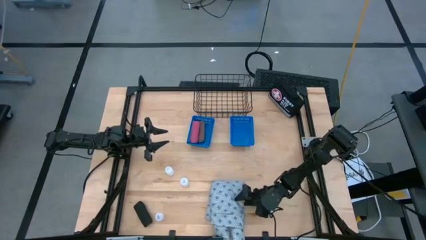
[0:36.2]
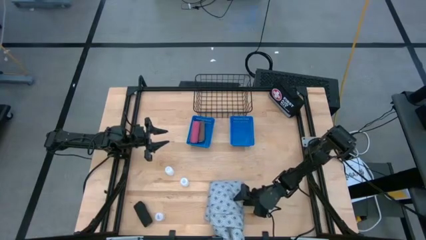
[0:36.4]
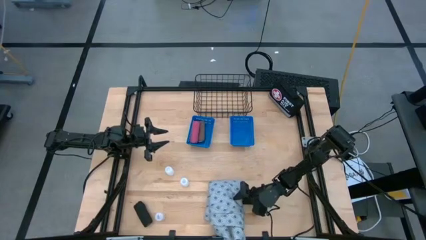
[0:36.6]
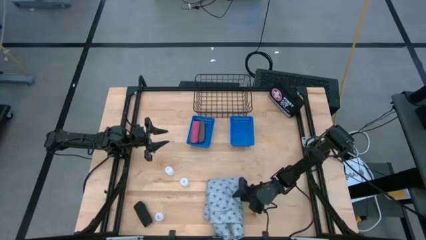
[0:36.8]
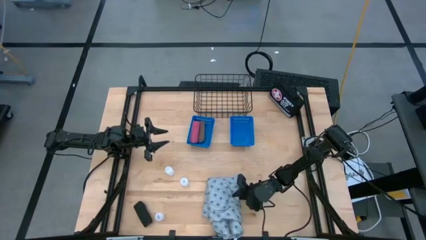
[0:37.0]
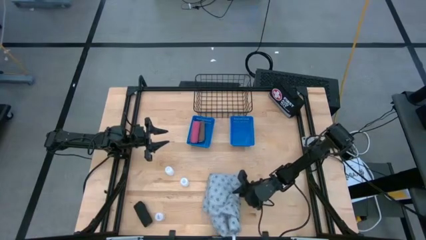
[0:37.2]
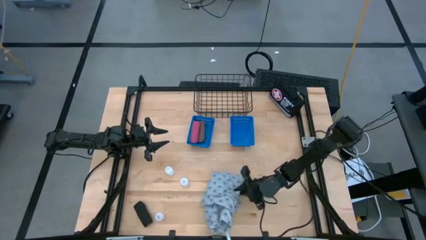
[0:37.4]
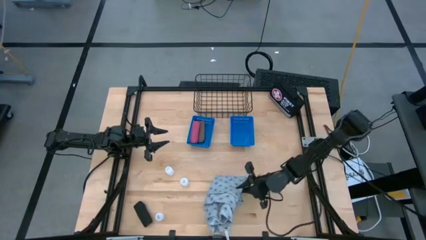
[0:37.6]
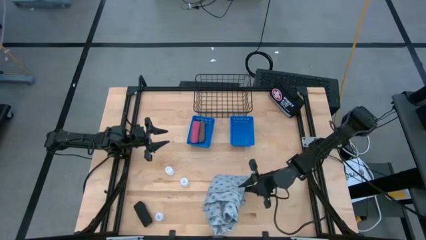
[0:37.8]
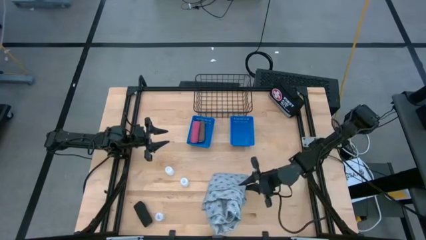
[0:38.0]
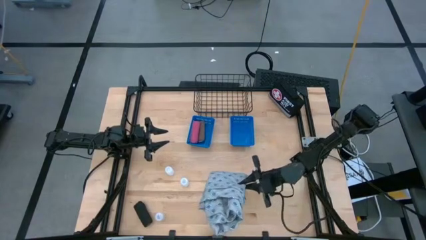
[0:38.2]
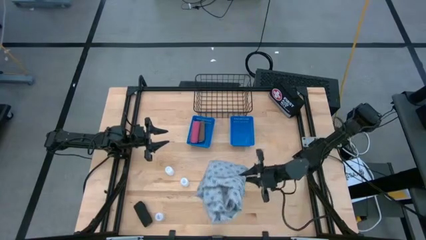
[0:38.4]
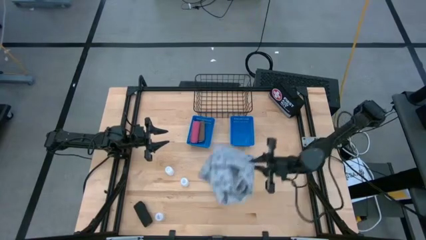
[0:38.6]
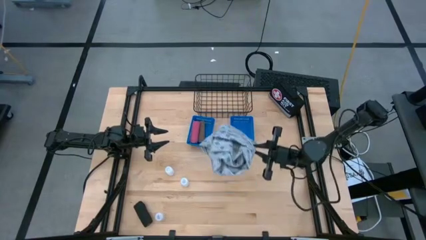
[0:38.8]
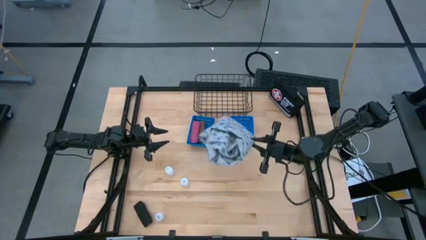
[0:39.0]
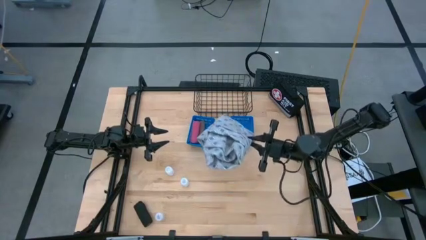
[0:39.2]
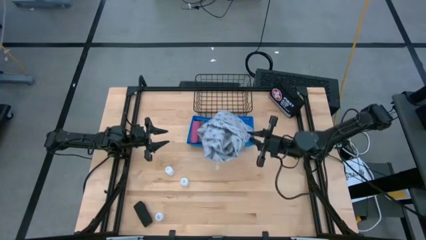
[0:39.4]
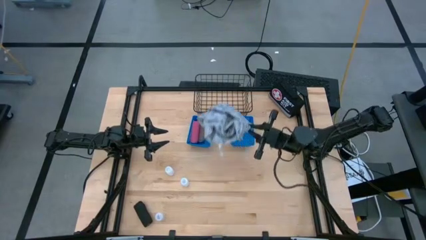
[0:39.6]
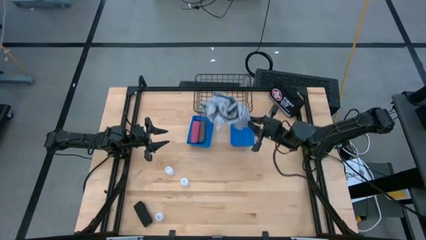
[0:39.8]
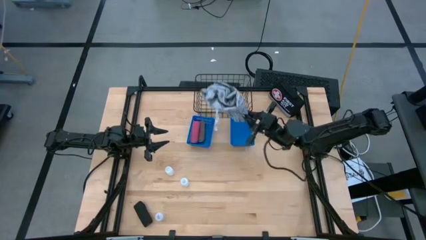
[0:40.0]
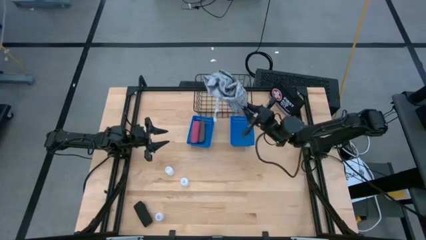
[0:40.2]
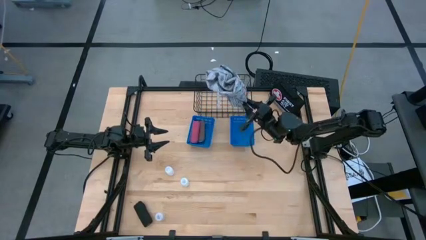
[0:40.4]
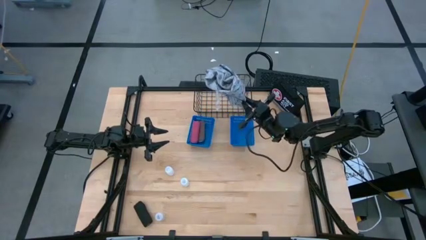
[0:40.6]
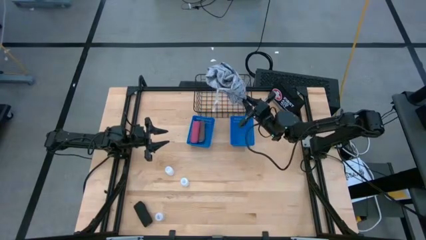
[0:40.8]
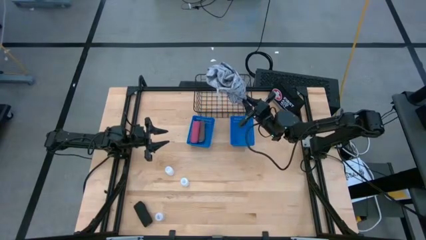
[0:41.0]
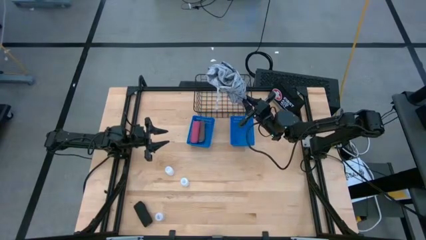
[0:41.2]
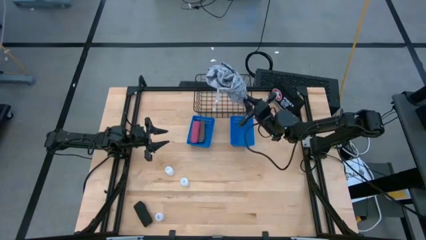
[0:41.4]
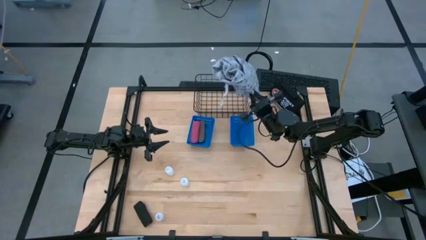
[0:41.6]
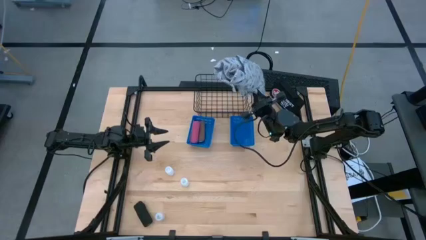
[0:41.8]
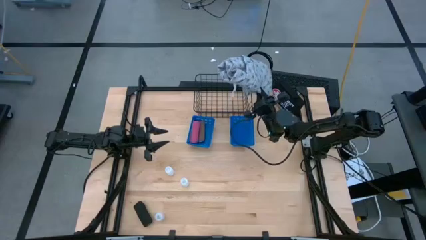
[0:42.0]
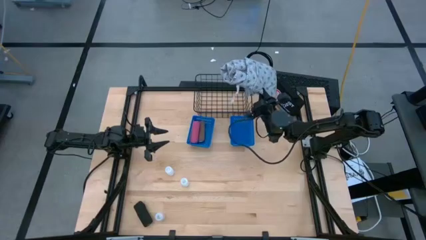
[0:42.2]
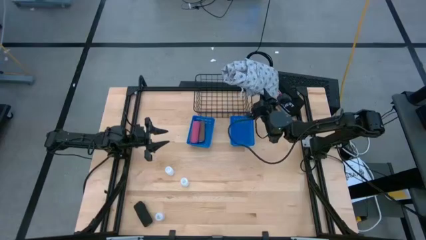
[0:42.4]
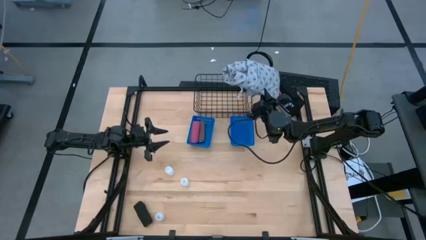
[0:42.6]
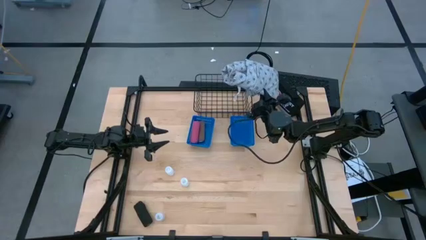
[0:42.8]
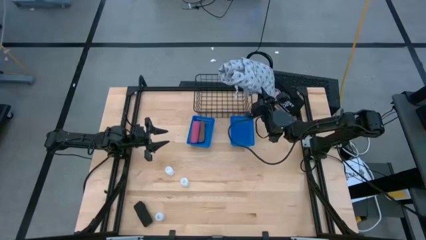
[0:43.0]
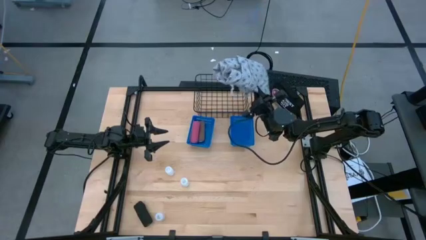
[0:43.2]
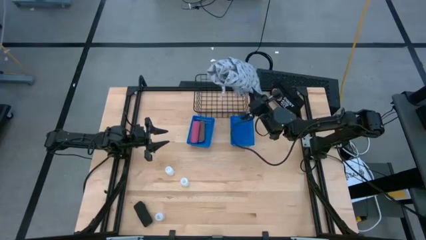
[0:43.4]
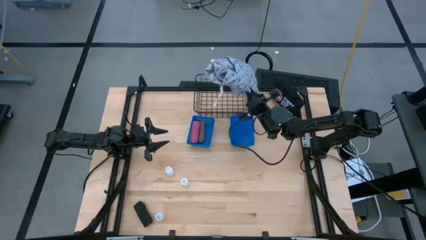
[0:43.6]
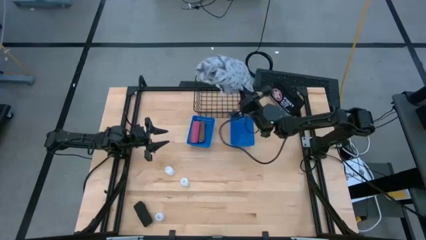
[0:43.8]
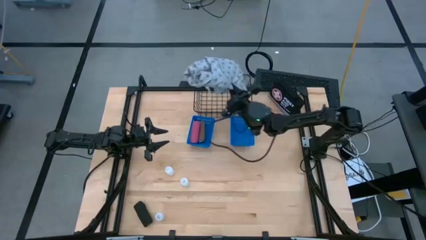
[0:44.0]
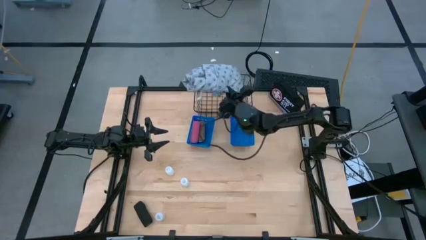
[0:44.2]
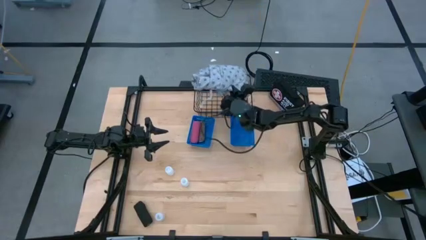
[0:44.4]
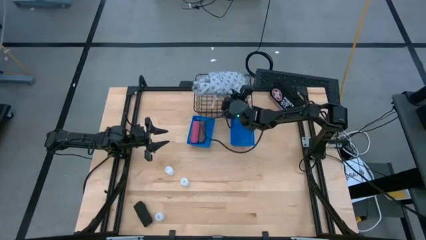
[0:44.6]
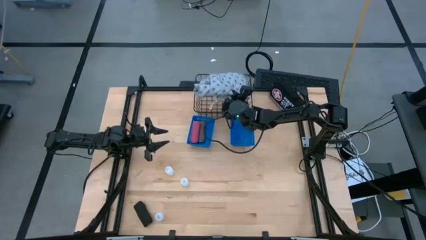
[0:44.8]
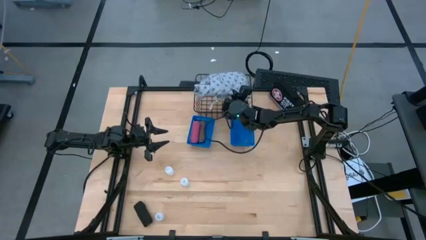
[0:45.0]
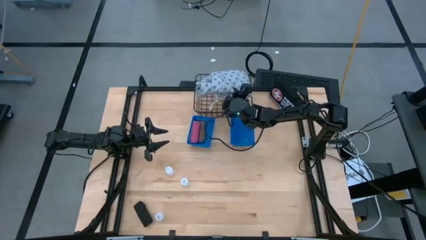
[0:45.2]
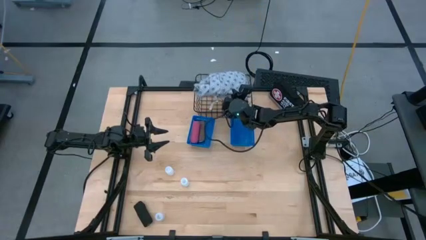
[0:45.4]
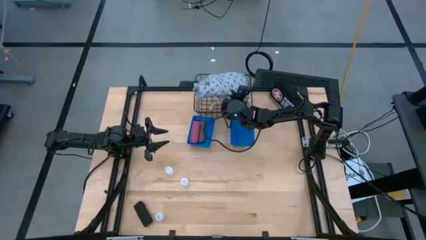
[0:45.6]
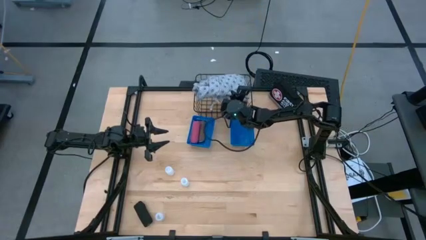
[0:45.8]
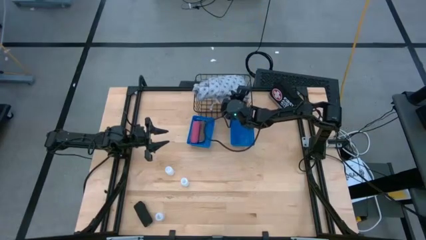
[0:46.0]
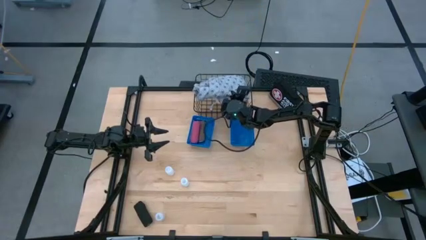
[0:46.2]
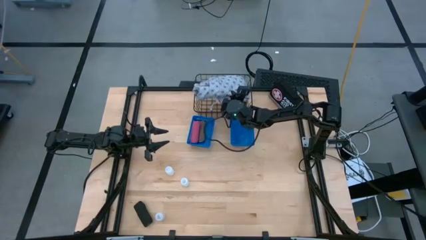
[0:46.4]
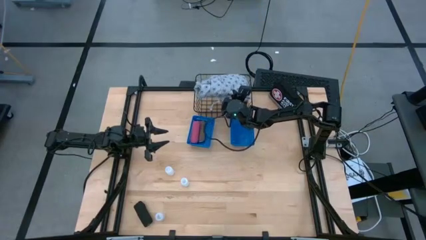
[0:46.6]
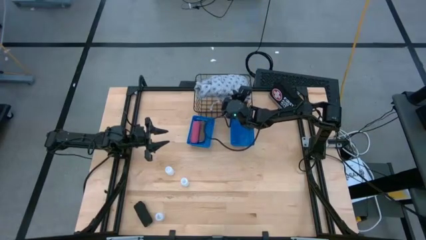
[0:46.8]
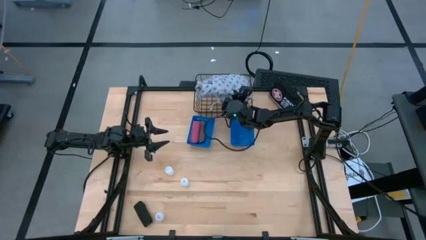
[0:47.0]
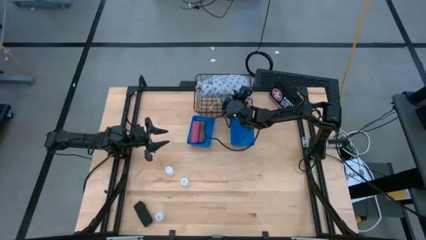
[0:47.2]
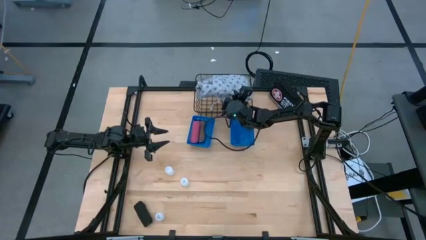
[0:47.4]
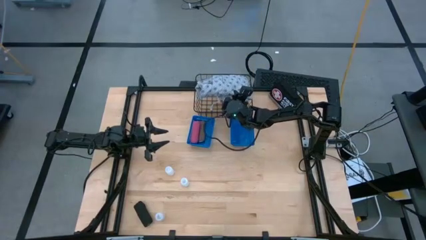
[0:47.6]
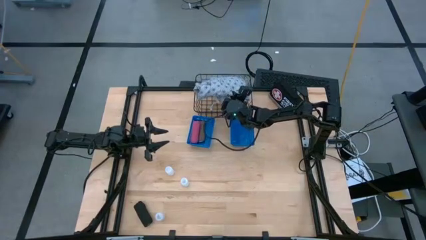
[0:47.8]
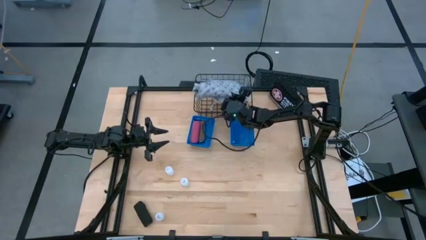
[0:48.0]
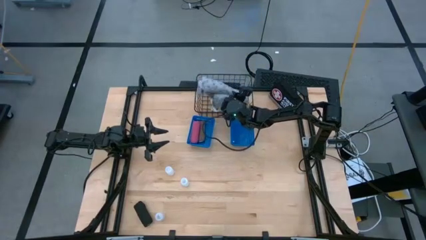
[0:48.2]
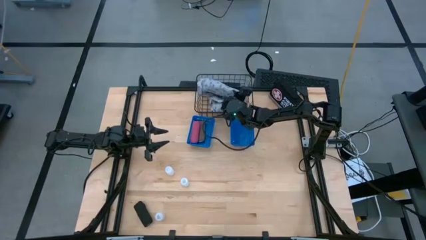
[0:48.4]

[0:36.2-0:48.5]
Task: Pick & Place Medicine items
Put the gray patient gown into the black wire basket

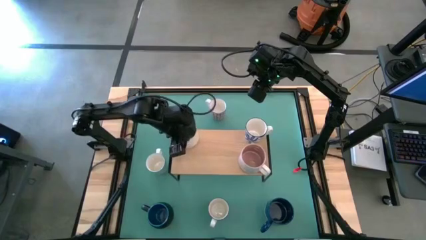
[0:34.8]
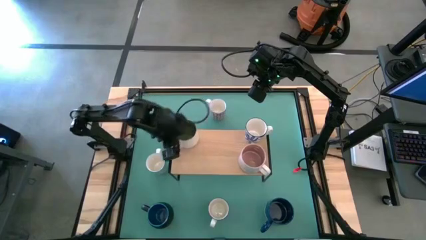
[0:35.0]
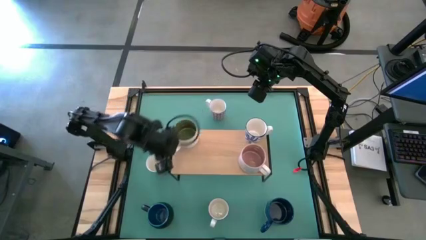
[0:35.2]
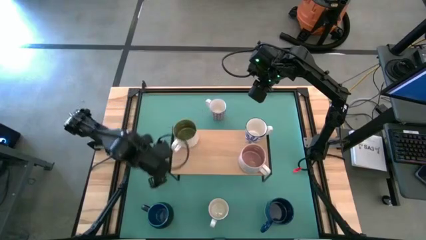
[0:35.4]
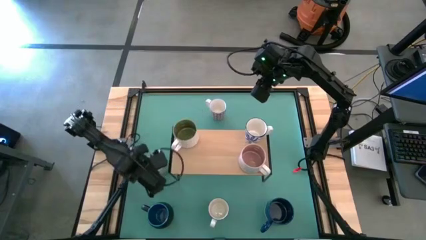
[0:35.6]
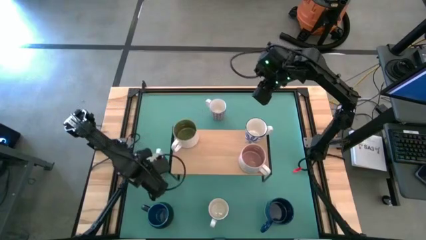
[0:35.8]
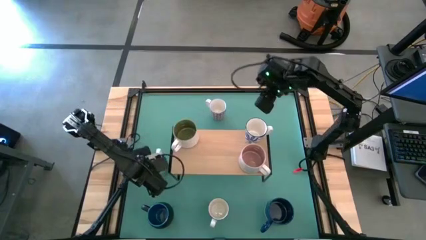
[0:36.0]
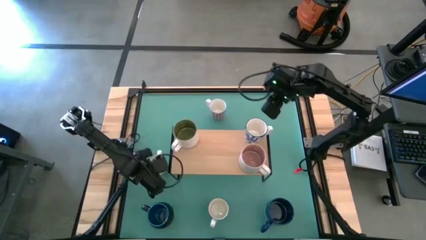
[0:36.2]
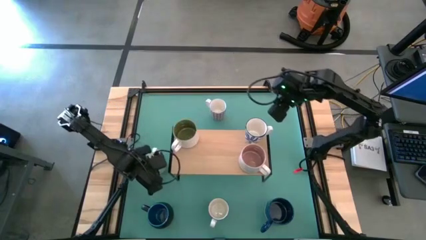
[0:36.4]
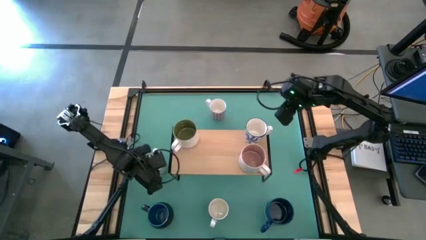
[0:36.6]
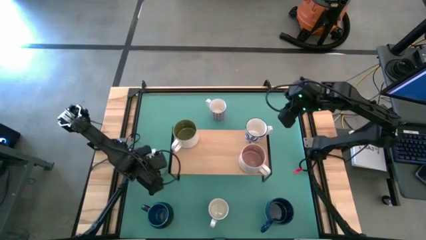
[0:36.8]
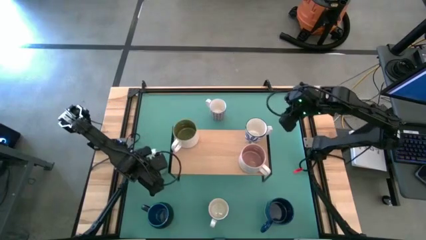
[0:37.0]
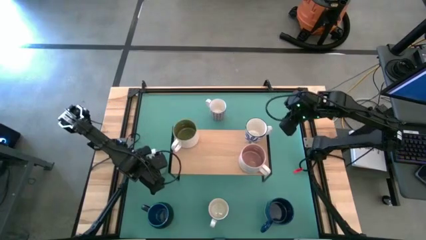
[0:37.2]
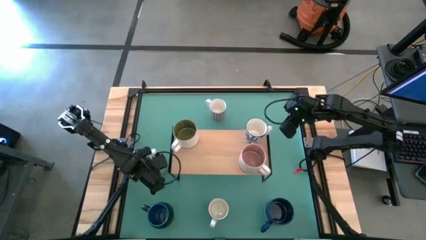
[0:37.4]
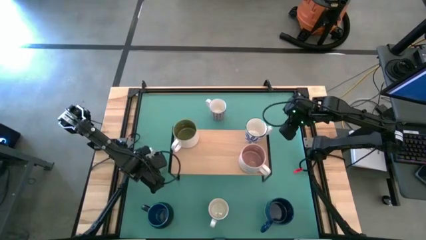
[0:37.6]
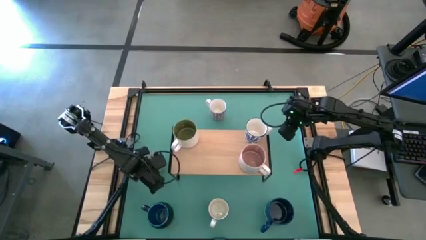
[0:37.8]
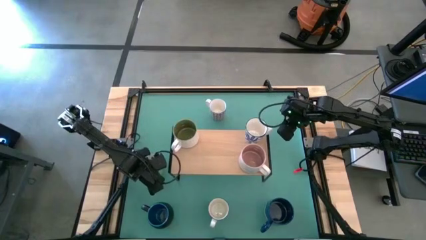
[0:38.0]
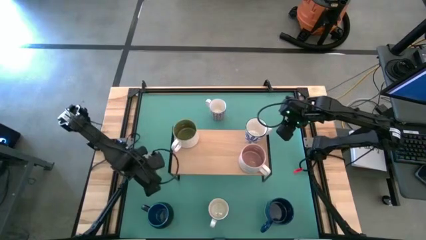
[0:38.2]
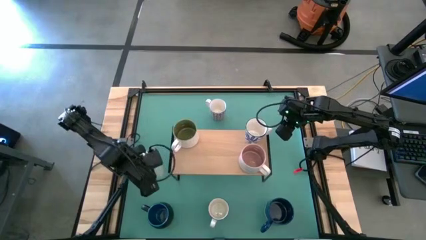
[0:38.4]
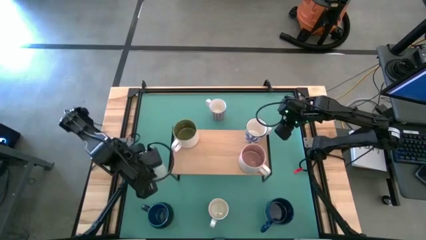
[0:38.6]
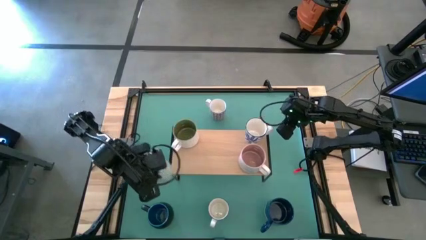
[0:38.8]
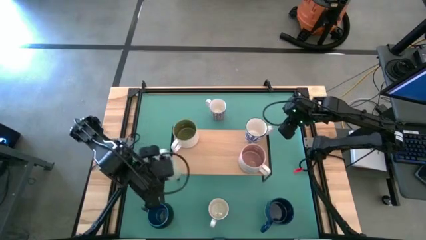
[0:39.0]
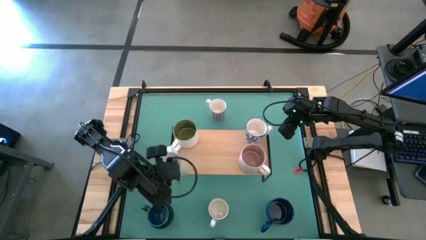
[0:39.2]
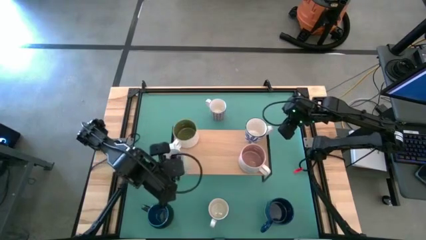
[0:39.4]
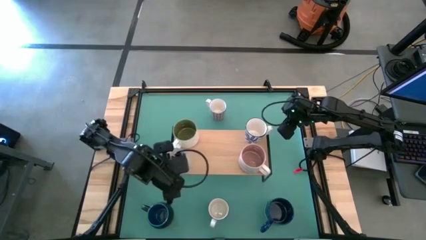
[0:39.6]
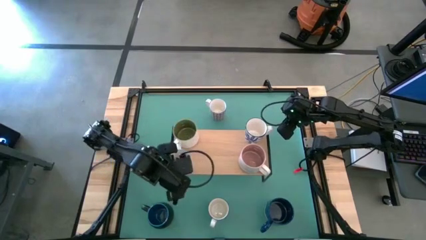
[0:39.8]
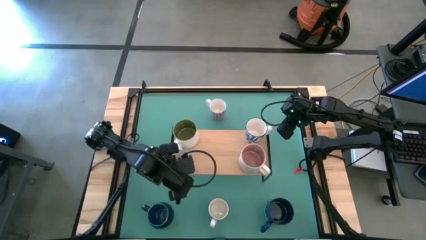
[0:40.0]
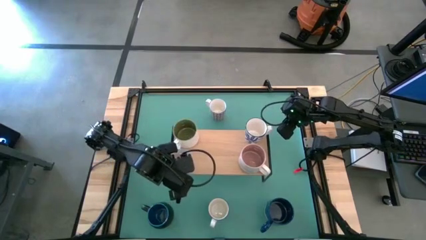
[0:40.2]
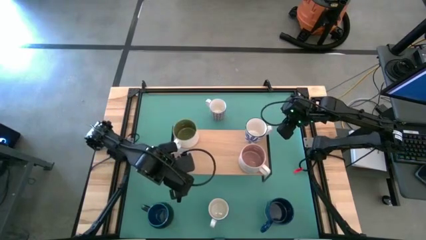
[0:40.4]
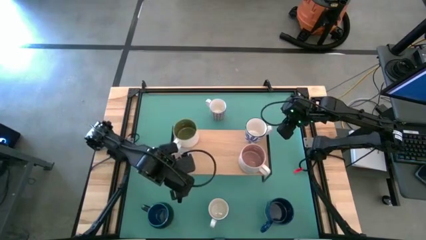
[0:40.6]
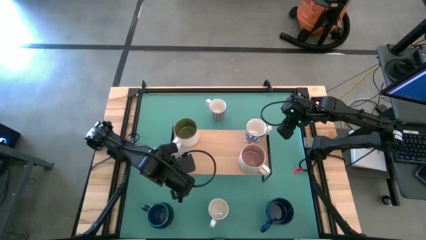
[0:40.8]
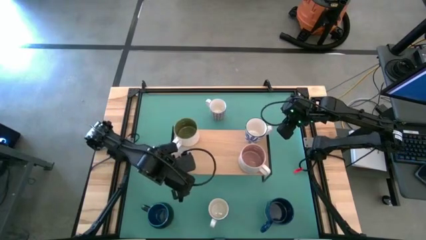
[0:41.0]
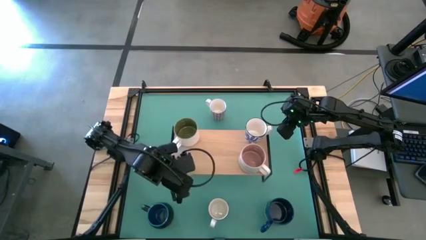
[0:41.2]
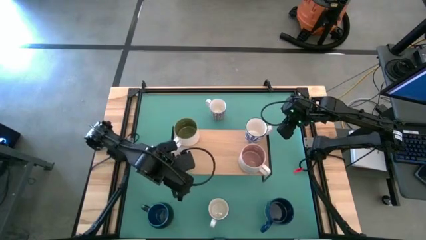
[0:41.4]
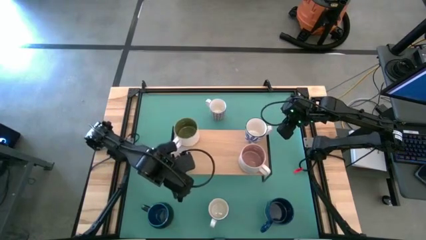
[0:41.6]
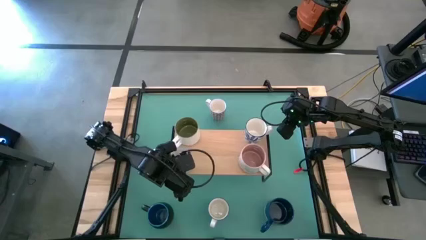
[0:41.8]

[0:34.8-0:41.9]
Task: Place coffee mugs
Put the white blue mug on the shelf
